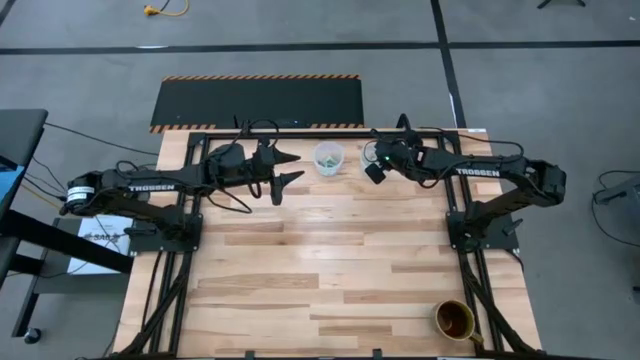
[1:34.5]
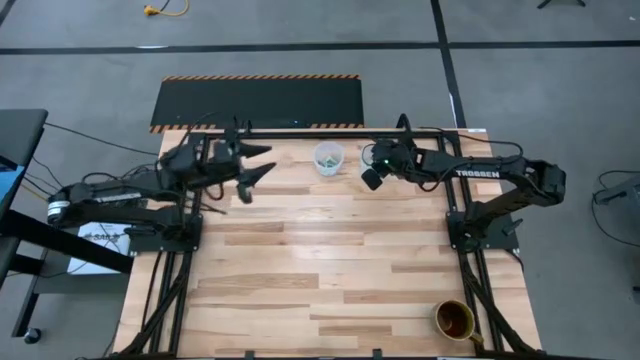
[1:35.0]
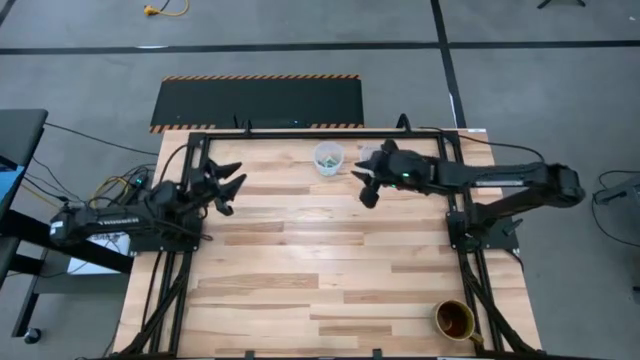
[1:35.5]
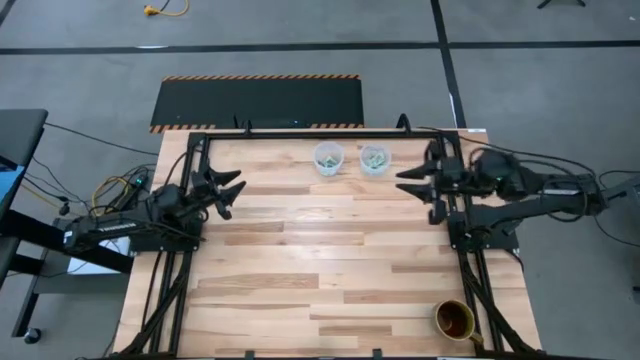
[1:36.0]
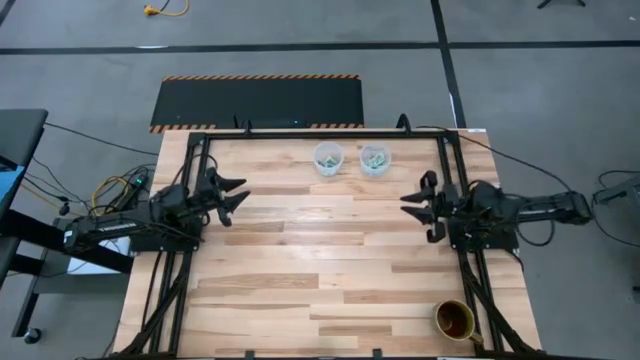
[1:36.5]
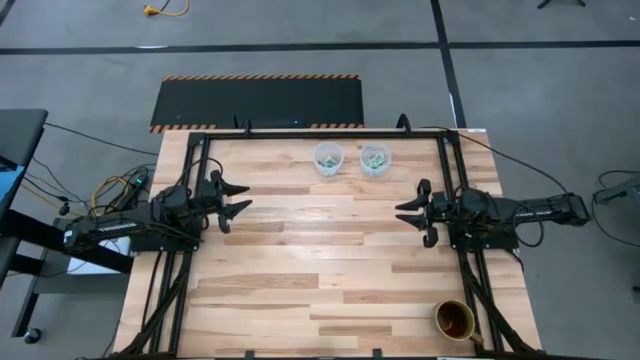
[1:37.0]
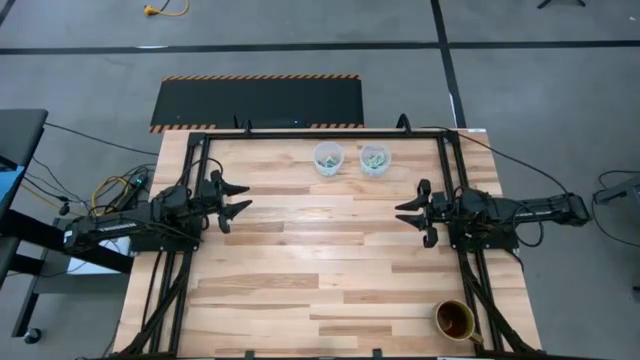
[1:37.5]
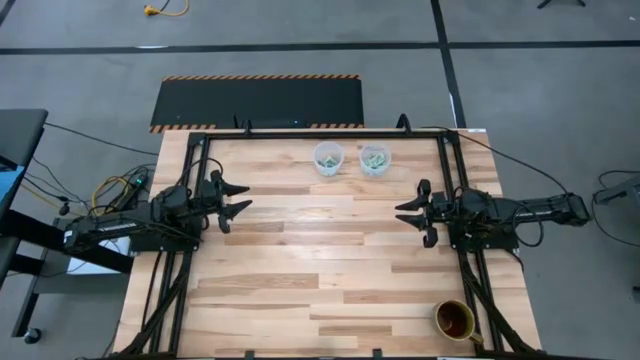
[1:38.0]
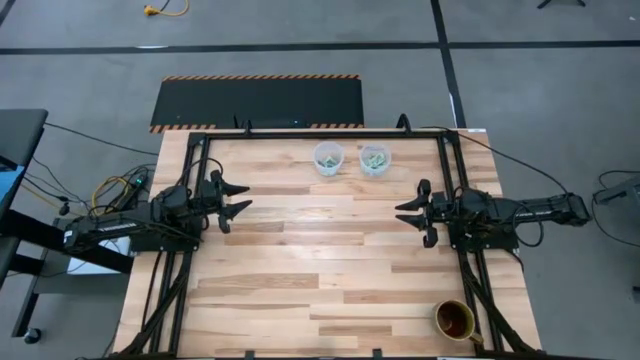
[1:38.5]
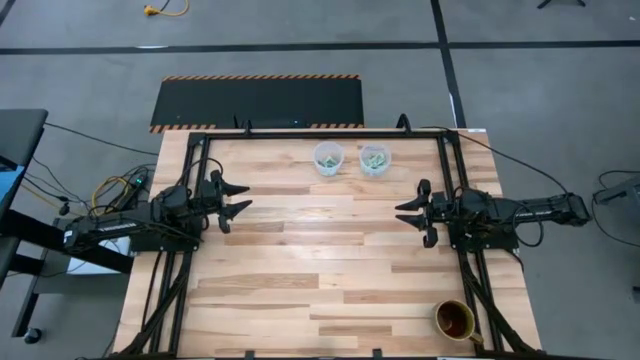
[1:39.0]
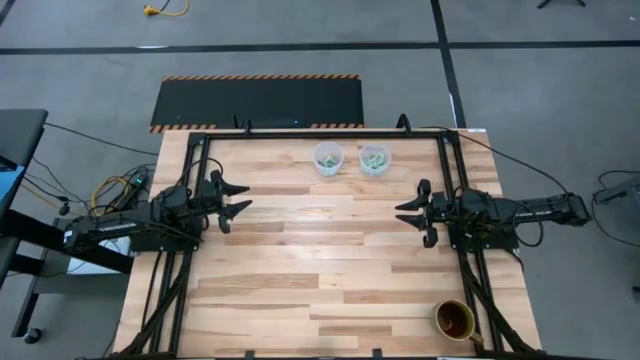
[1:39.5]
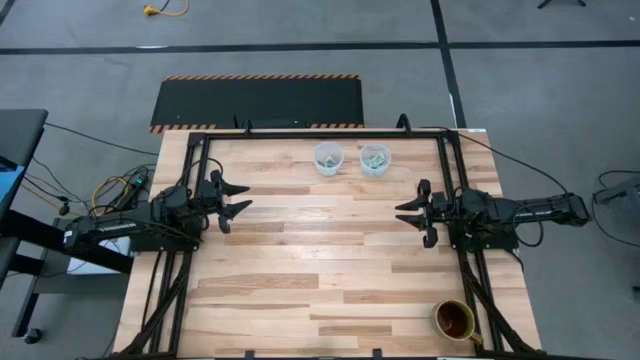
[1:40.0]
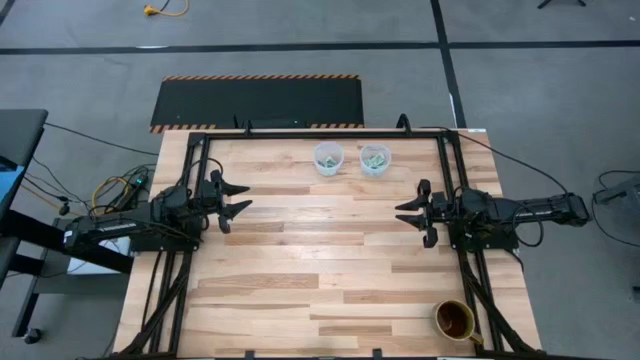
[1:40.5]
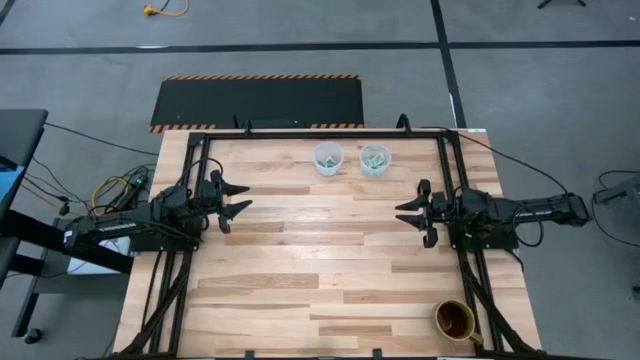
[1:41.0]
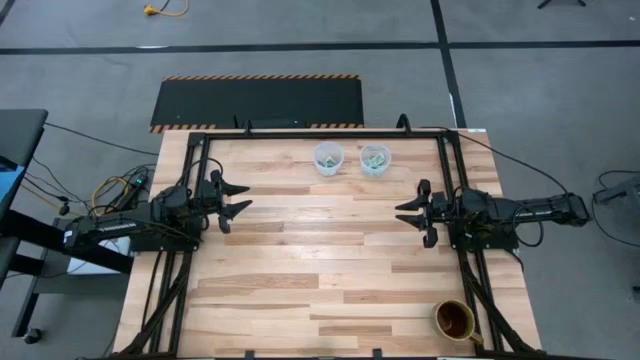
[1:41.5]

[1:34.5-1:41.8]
Task: Pick and place Stevia / Truvia into bins
Return to Home Position

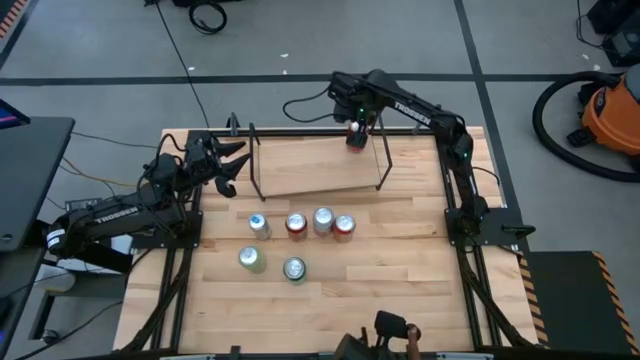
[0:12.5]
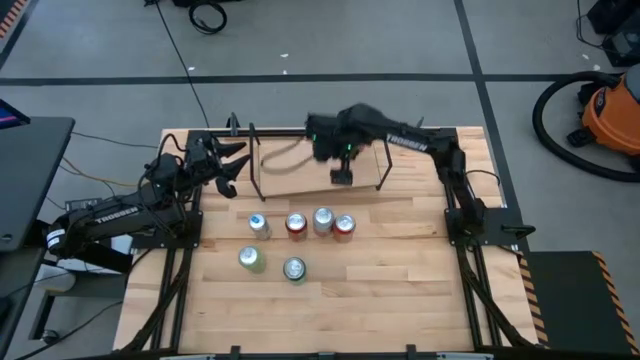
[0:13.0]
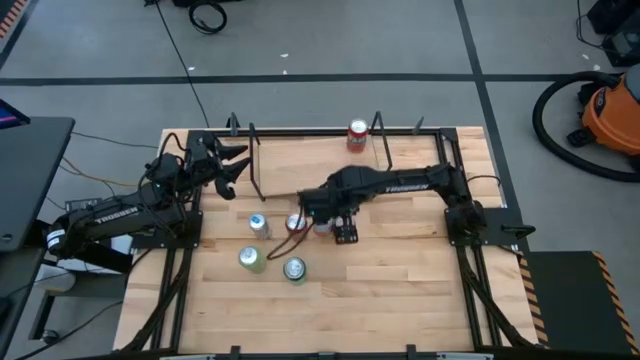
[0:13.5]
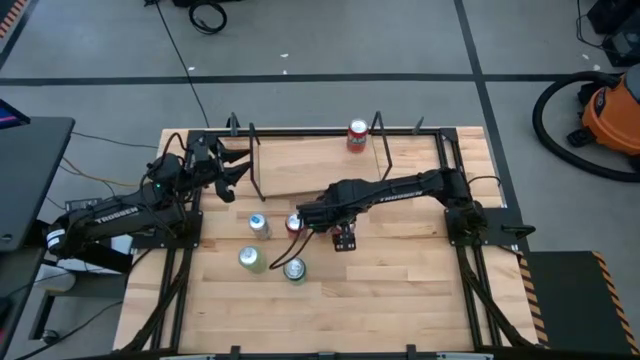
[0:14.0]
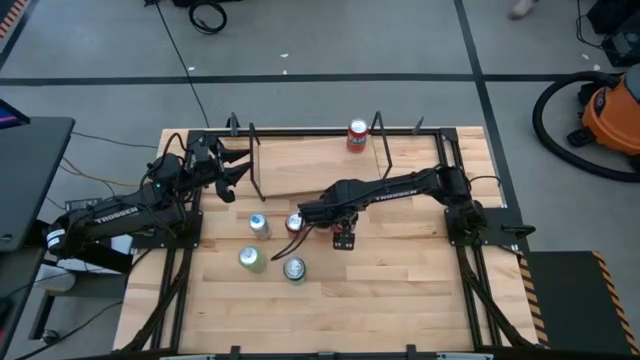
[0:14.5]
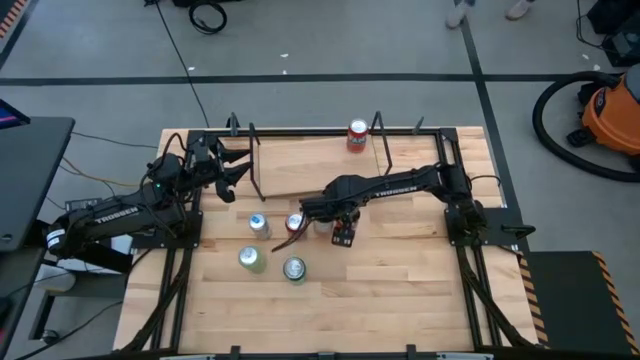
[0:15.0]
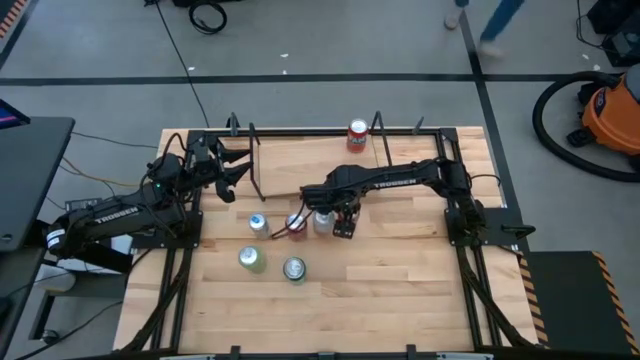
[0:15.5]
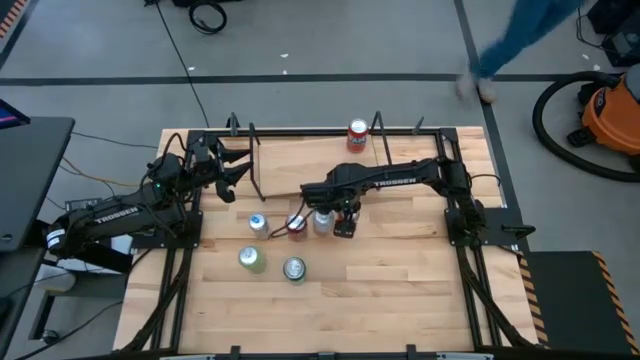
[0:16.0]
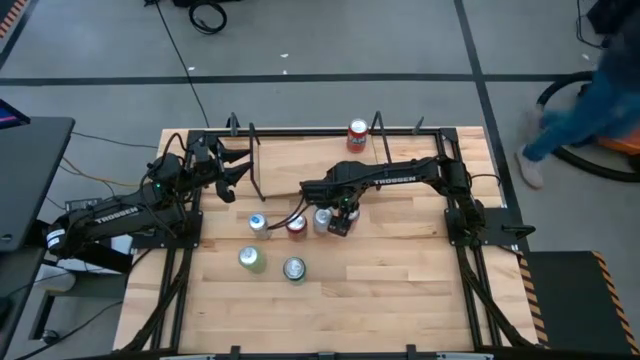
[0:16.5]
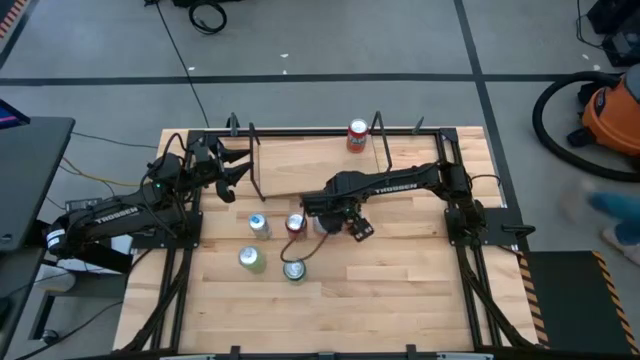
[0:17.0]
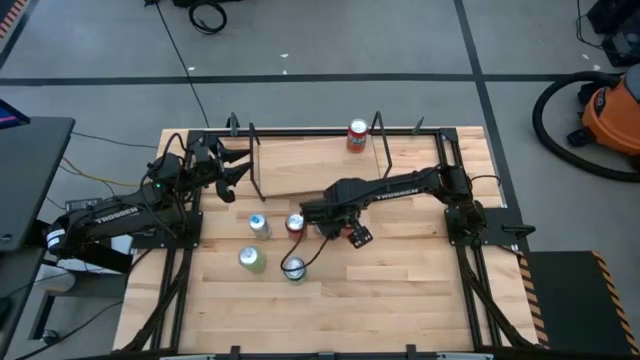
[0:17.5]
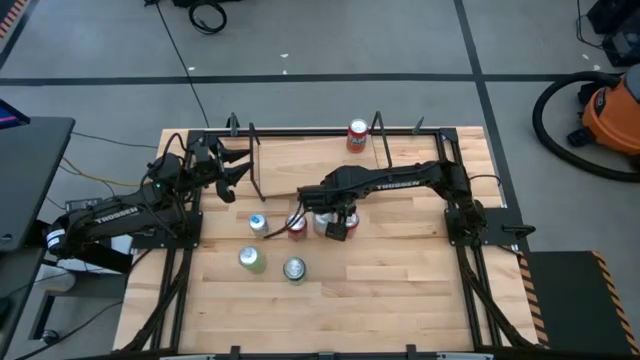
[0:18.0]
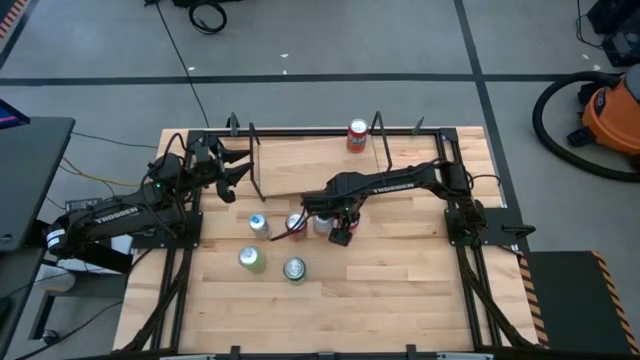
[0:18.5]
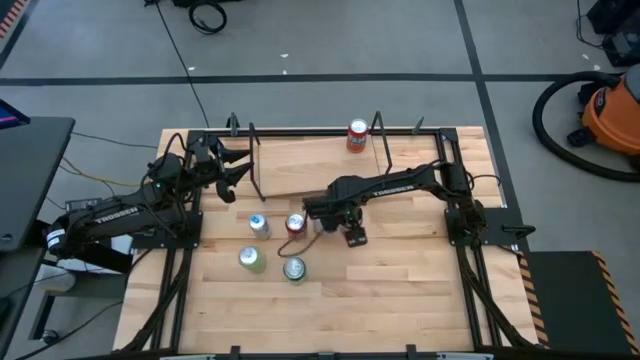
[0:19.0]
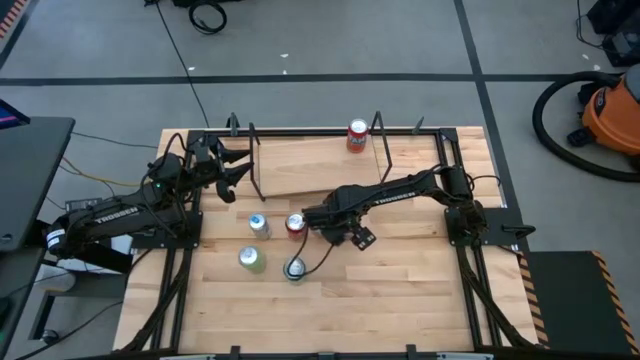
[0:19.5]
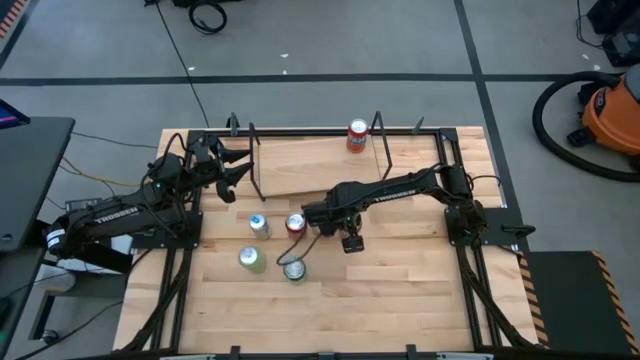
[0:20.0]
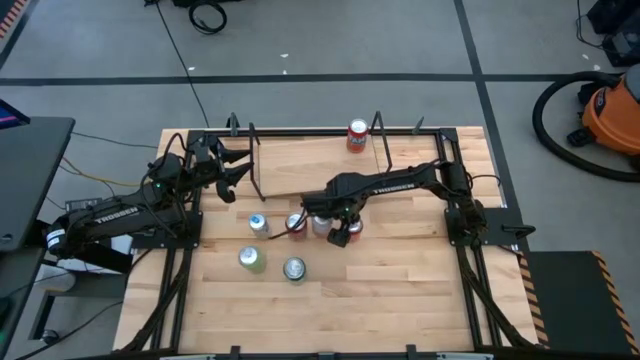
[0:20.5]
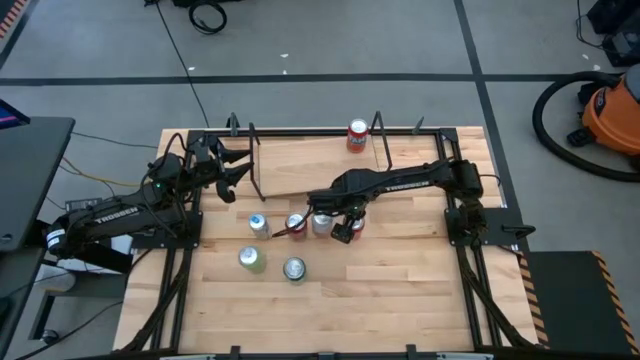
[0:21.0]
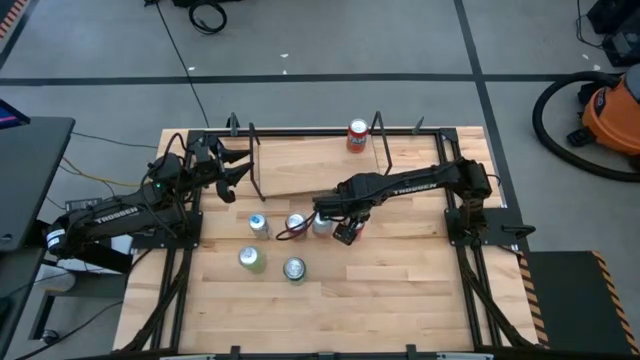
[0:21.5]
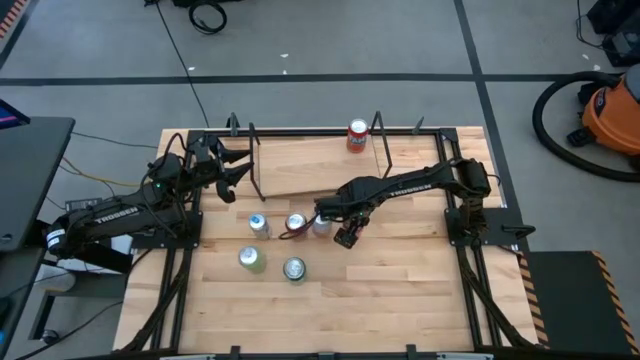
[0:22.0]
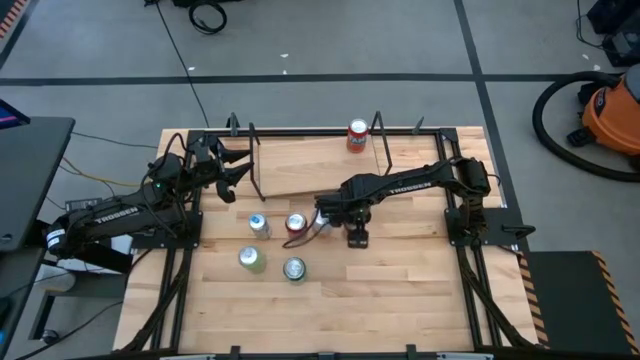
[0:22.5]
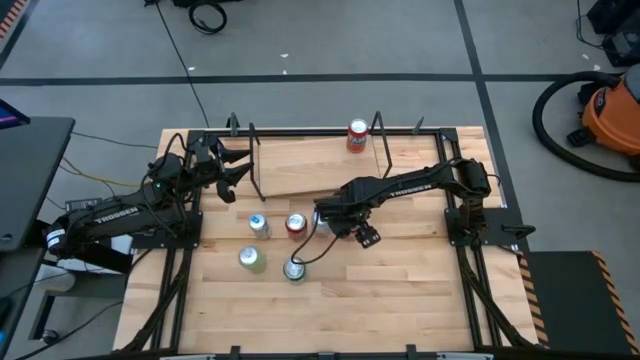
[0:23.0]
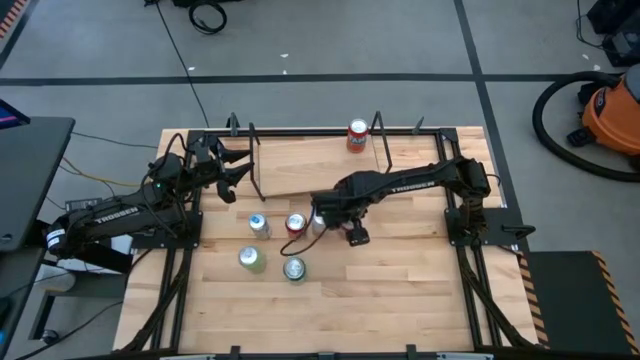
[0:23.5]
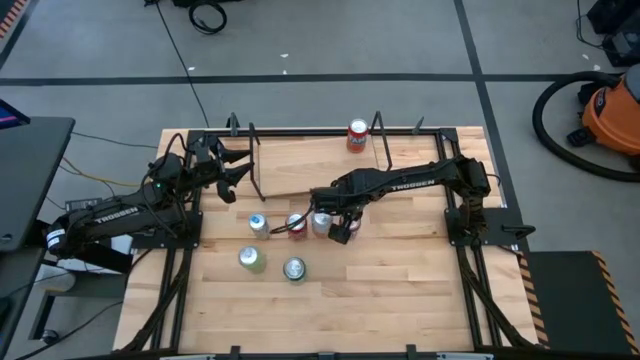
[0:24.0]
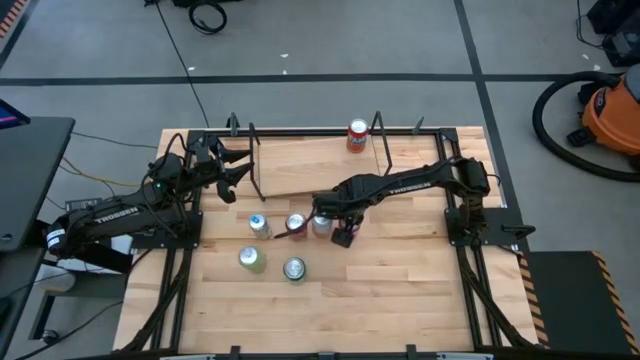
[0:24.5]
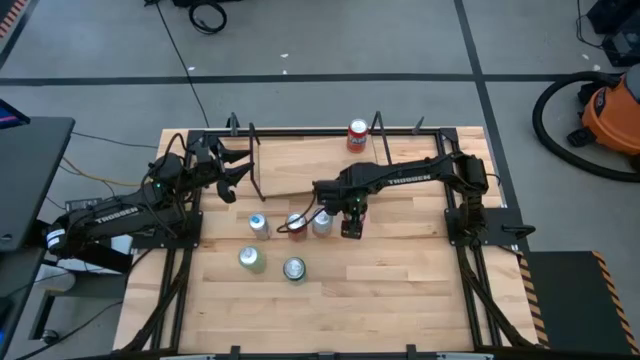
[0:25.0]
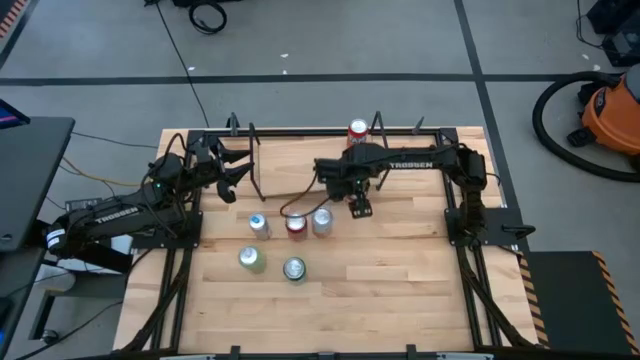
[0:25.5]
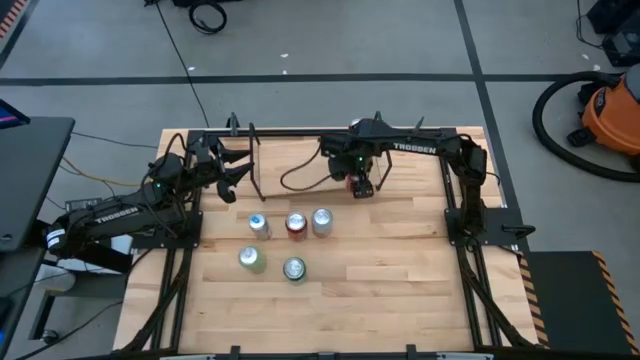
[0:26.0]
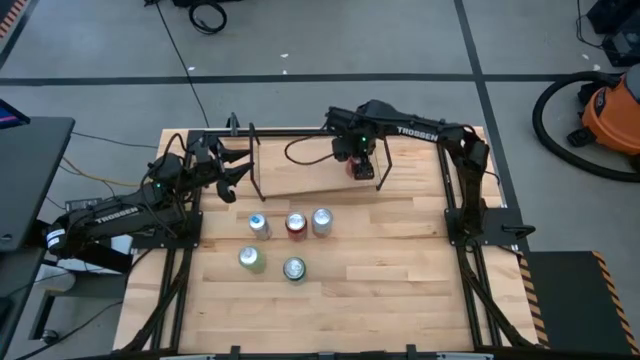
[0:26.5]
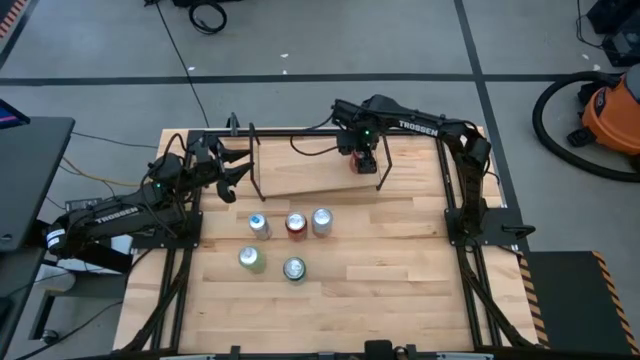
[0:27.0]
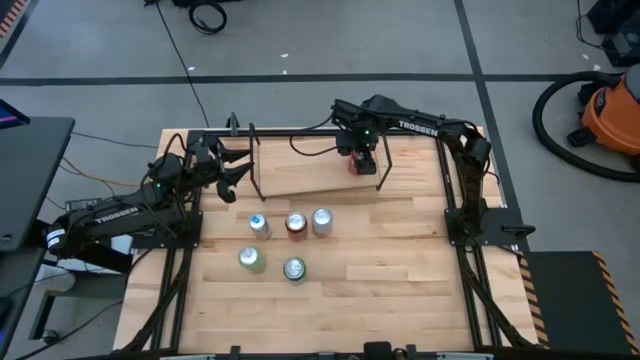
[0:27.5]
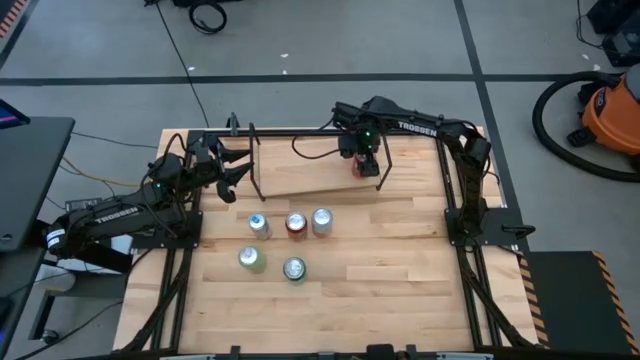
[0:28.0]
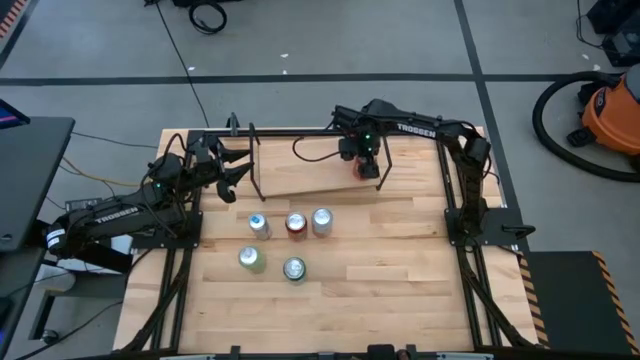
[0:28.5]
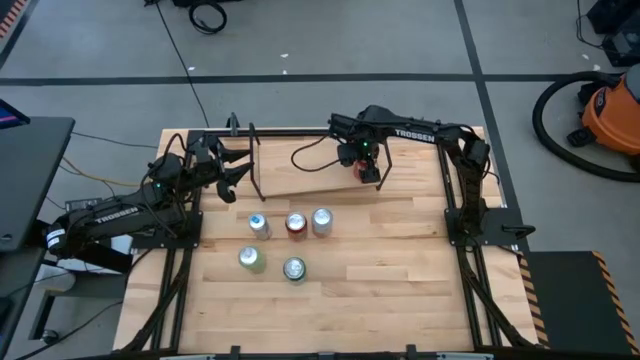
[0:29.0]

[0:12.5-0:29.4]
Task: Place canned beverage on shelf
Put the red soda can on the shelf aligned with the other red soda can
